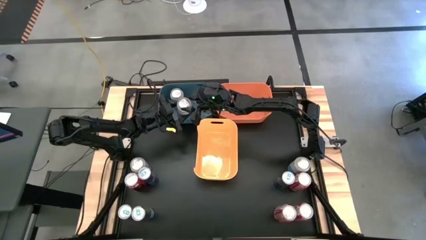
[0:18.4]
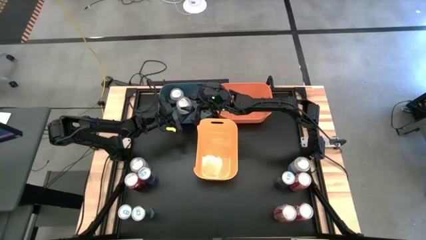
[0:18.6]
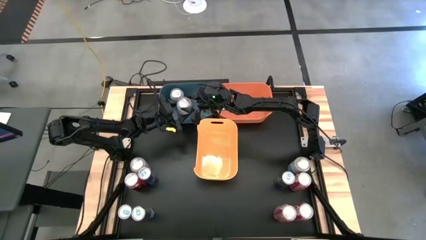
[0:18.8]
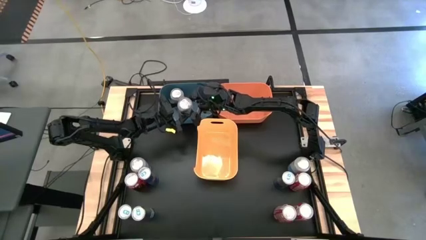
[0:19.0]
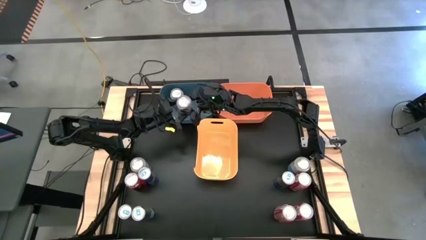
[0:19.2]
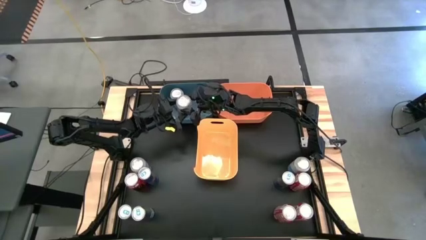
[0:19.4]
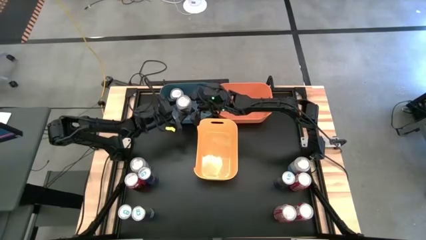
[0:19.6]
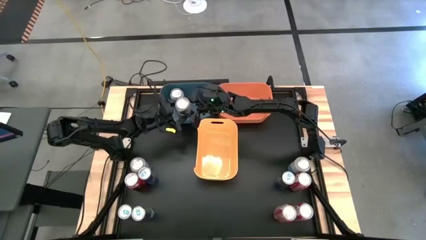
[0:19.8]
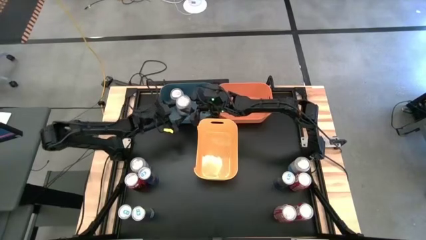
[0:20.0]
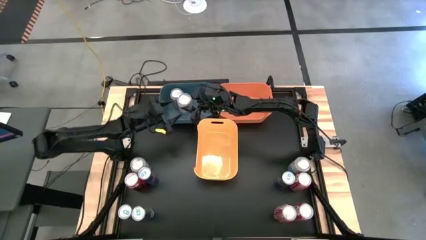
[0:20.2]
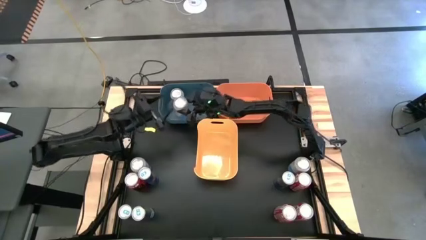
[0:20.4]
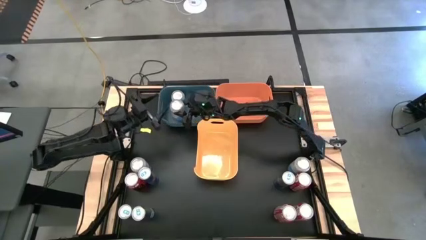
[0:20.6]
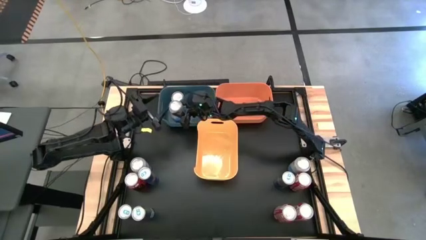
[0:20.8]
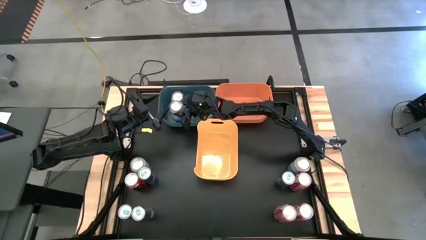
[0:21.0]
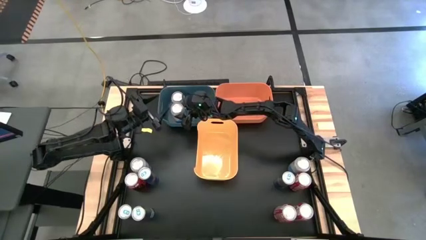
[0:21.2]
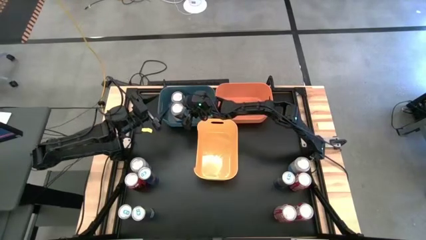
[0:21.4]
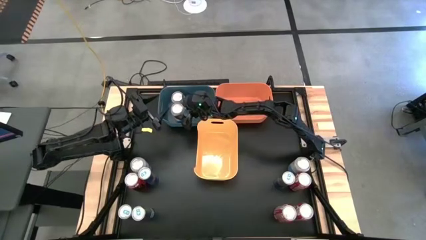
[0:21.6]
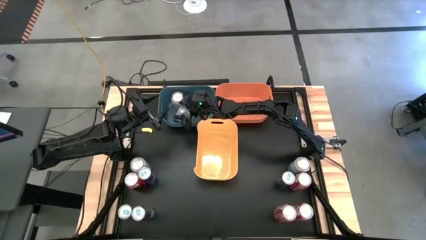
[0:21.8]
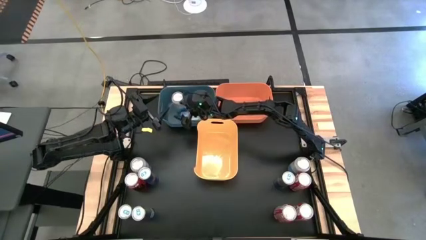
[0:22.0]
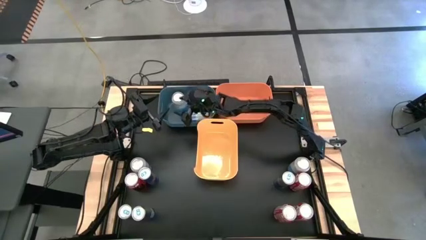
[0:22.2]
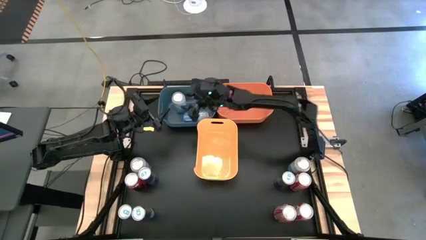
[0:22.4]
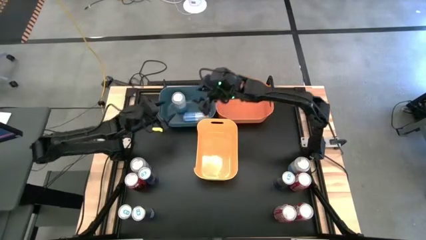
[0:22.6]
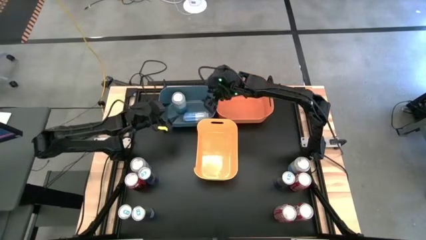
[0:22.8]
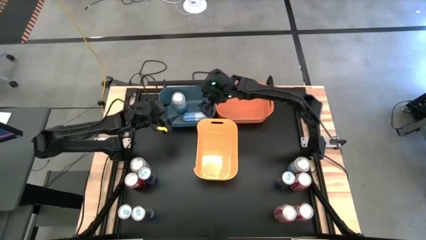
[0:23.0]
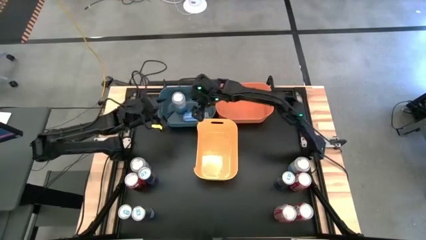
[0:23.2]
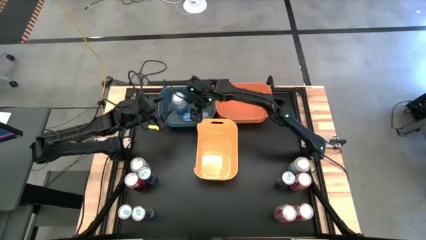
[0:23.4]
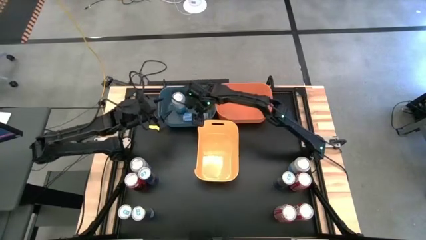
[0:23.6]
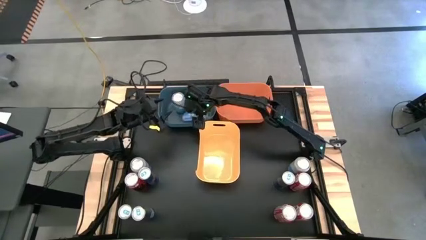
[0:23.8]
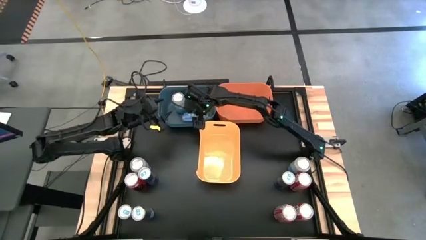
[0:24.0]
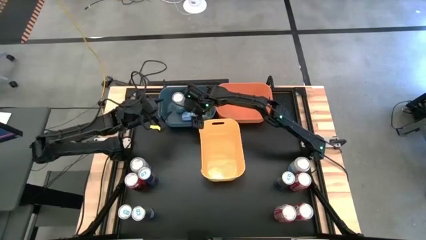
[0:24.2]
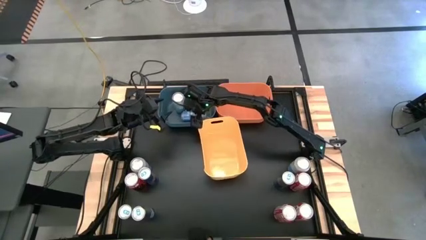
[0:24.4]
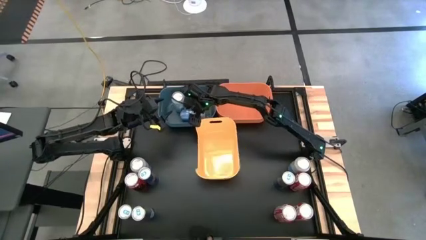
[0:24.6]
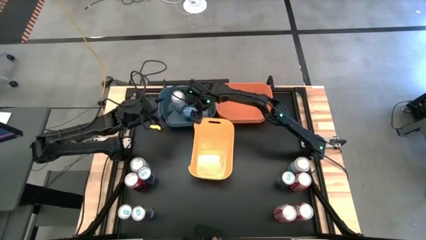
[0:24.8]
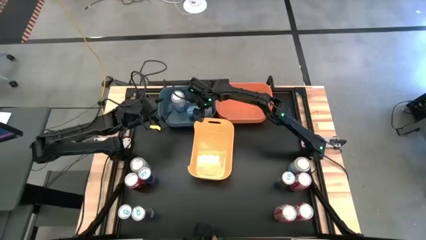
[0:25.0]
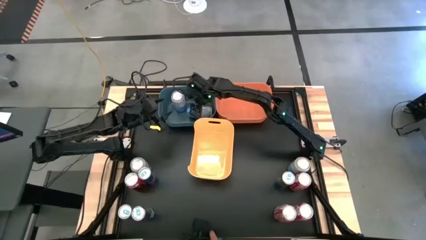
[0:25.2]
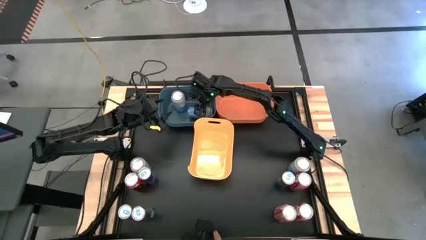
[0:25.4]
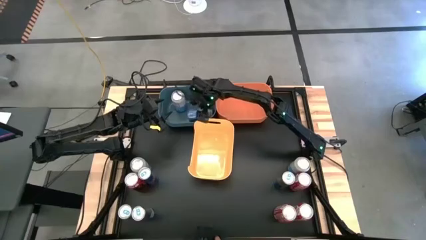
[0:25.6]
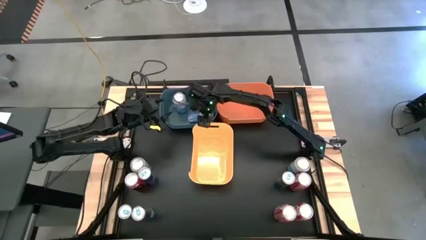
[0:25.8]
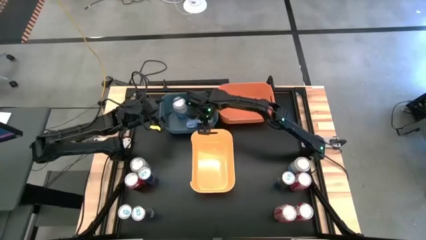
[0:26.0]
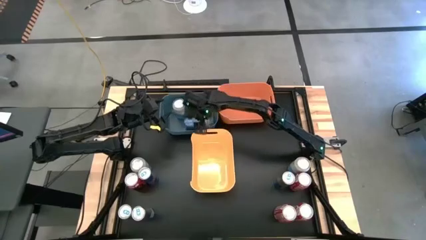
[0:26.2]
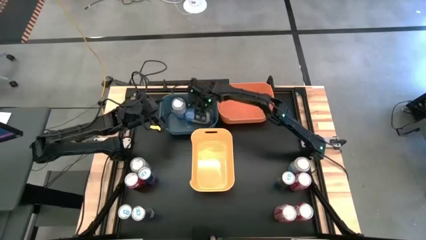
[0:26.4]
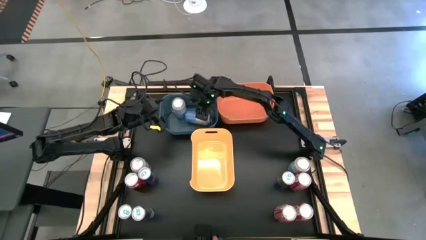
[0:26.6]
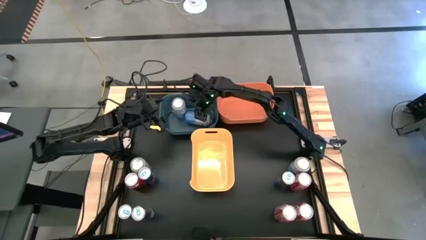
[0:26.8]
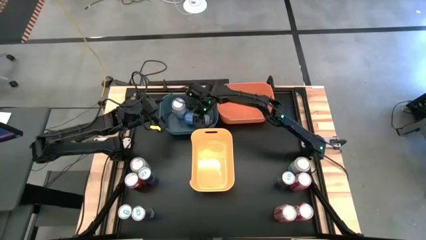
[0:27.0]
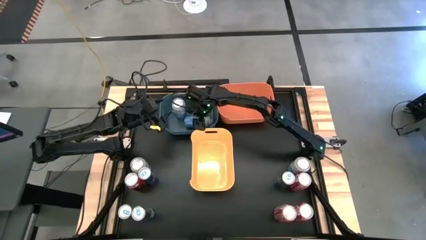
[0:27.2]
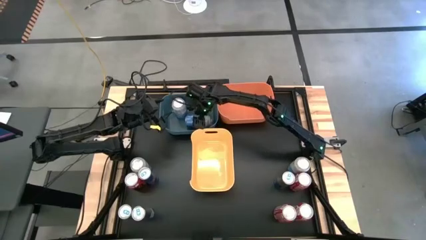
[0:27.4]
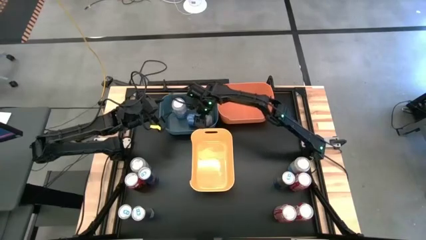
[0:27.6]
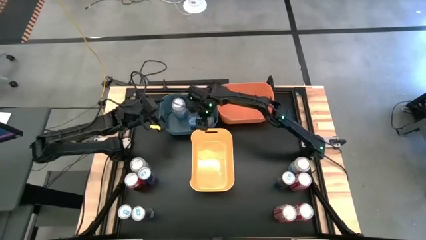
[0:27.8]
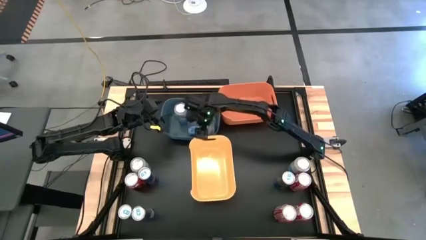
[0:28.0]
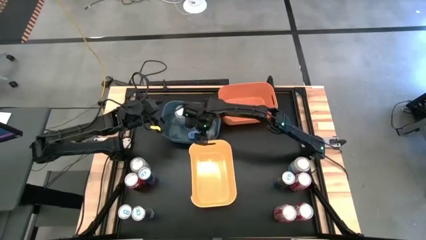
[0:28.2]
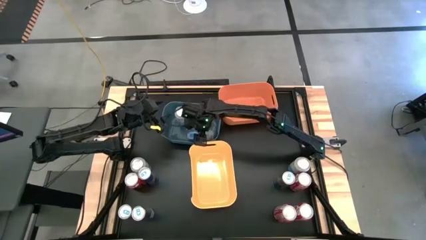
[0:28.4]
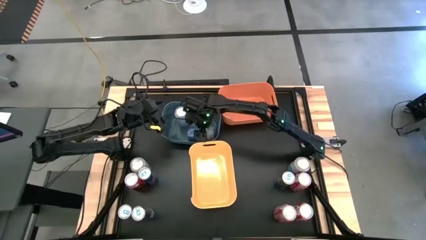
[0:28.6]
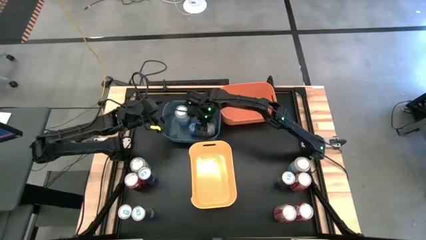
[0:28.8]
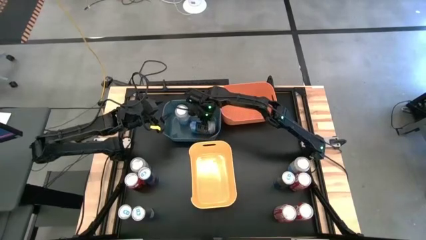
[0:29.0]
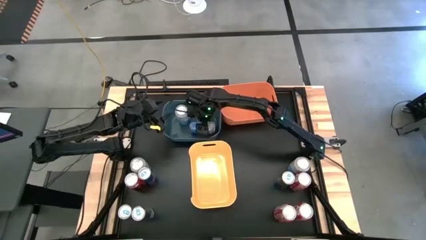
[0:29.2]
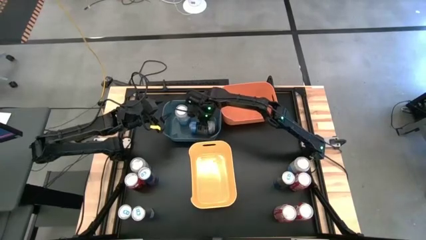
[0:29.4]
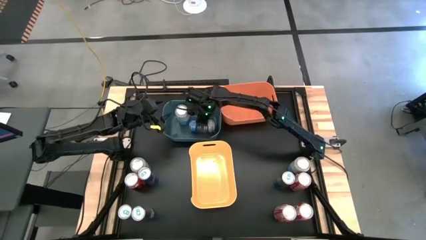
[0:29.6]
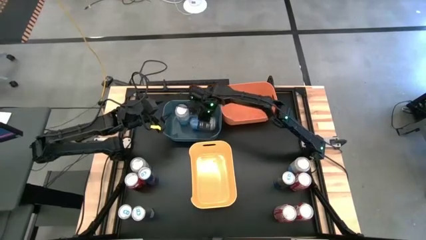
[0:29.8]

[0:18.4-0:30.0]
Task: Sort soda cans
Put the top blue-white soda can into the blue bin
